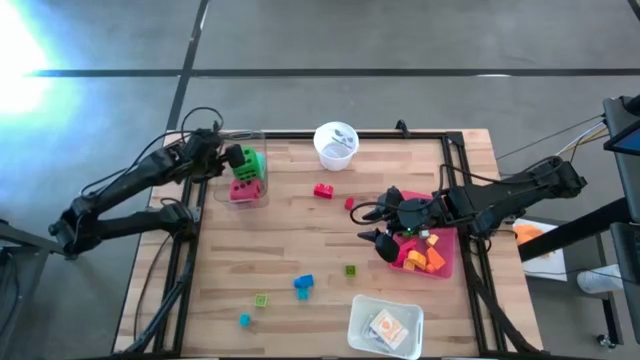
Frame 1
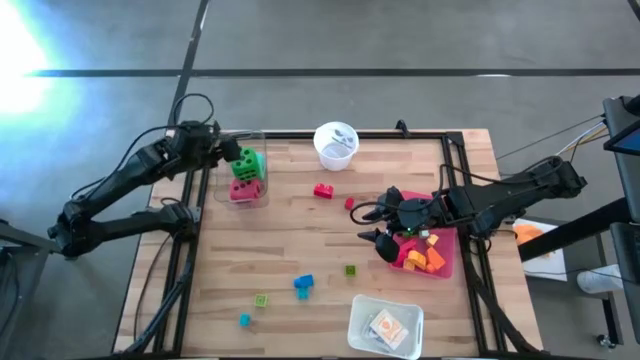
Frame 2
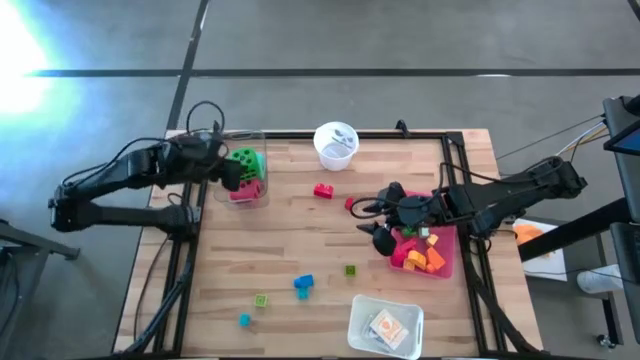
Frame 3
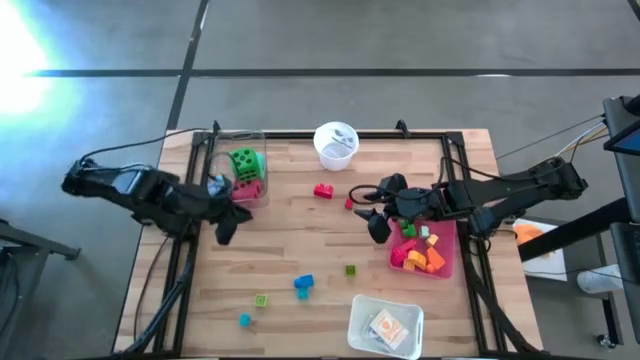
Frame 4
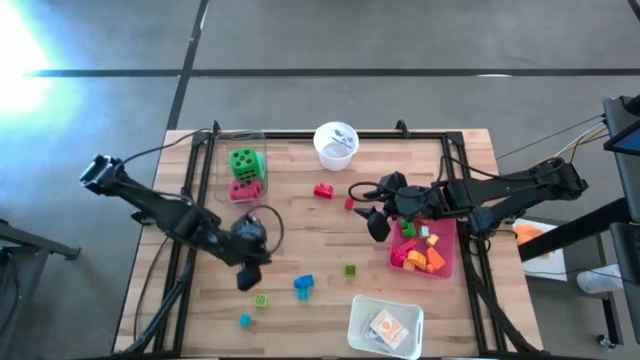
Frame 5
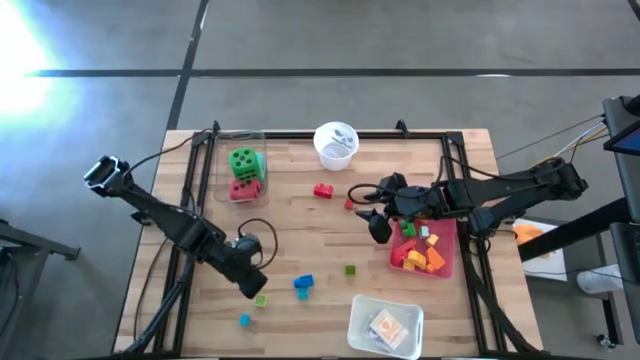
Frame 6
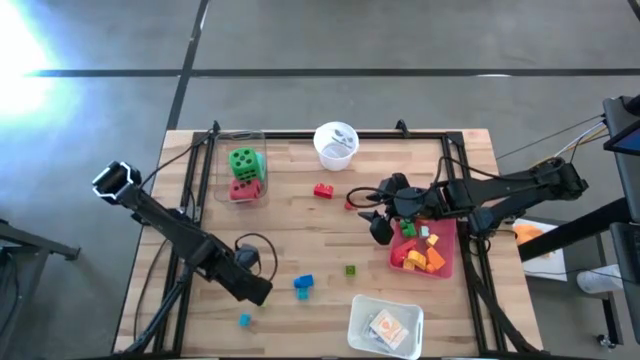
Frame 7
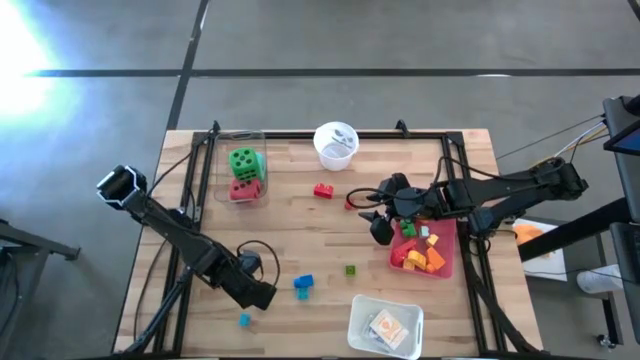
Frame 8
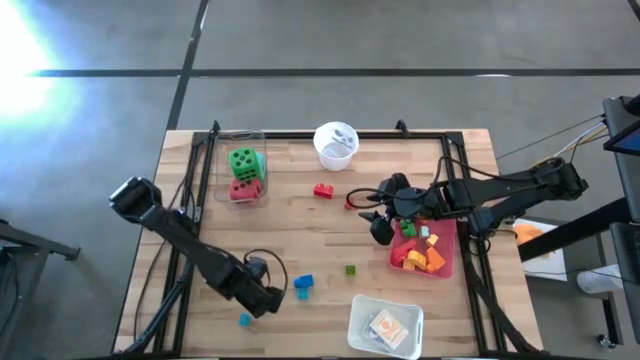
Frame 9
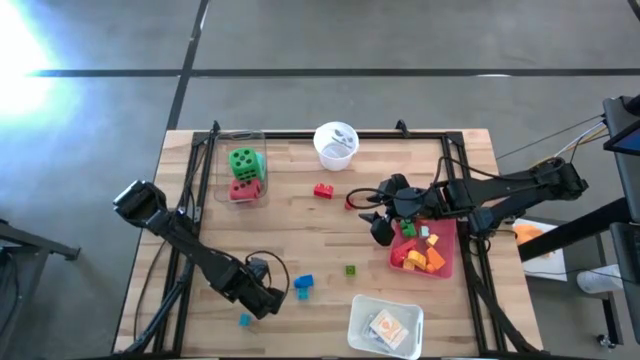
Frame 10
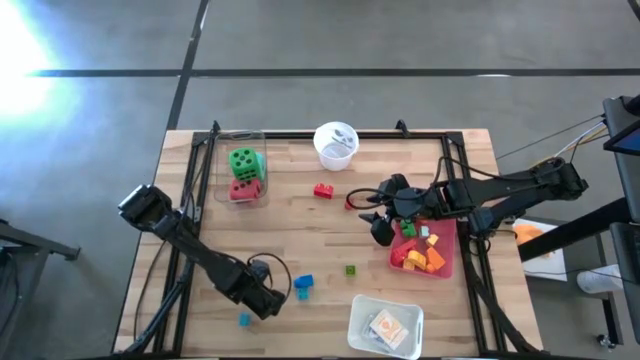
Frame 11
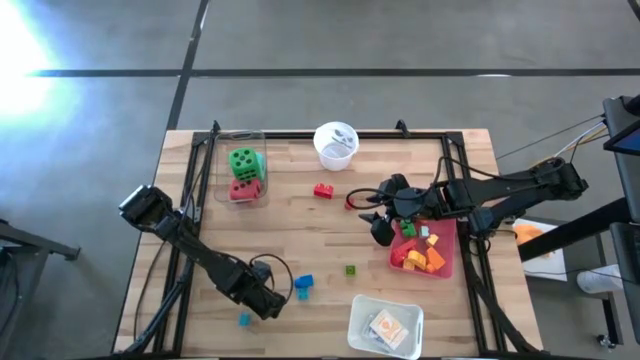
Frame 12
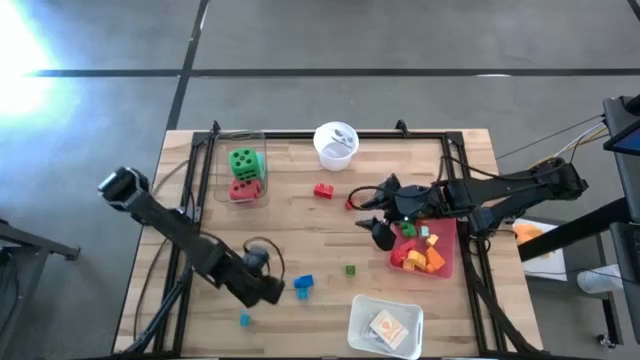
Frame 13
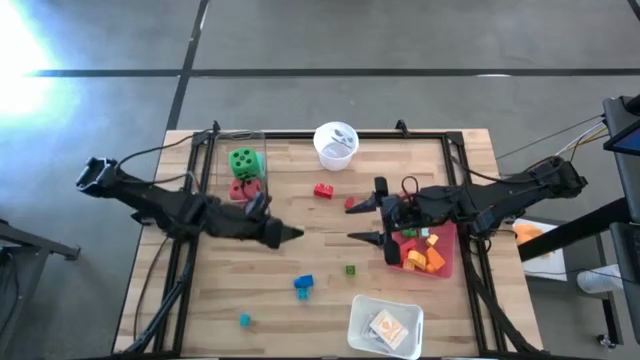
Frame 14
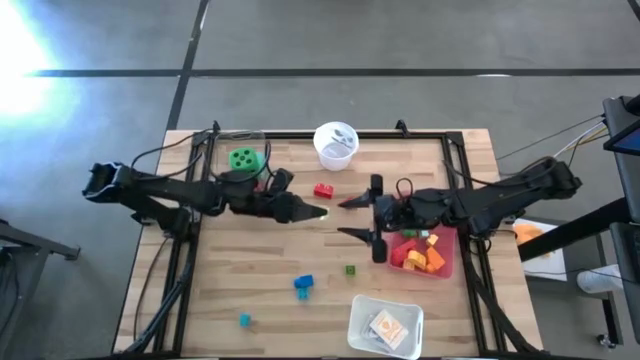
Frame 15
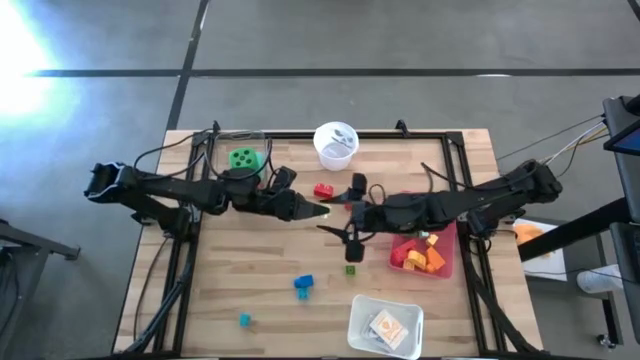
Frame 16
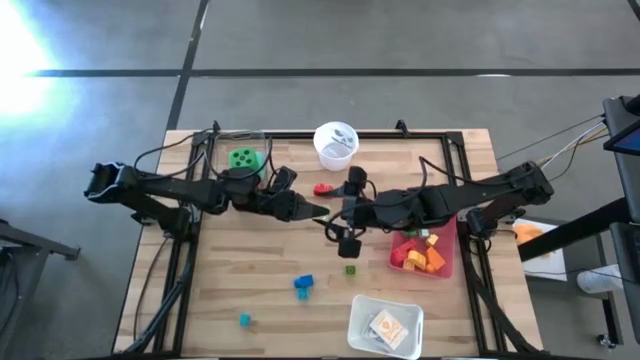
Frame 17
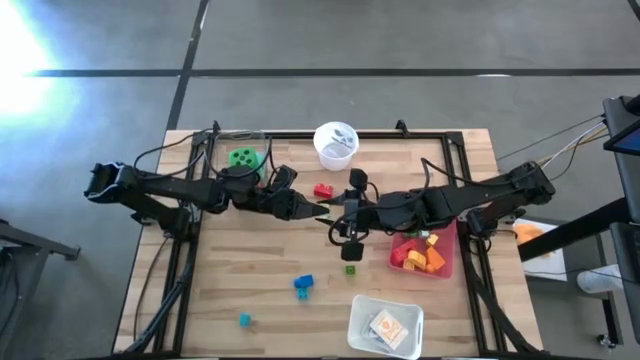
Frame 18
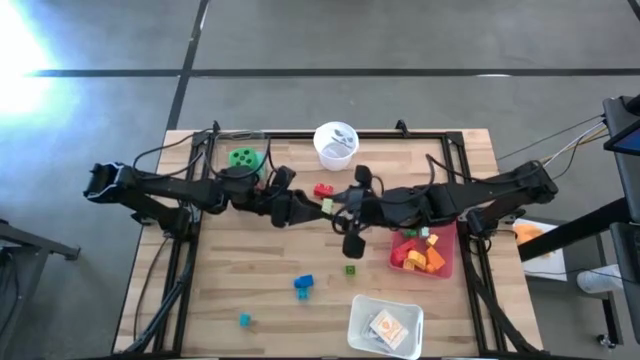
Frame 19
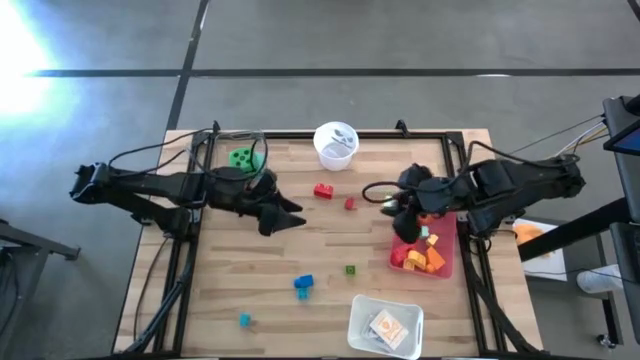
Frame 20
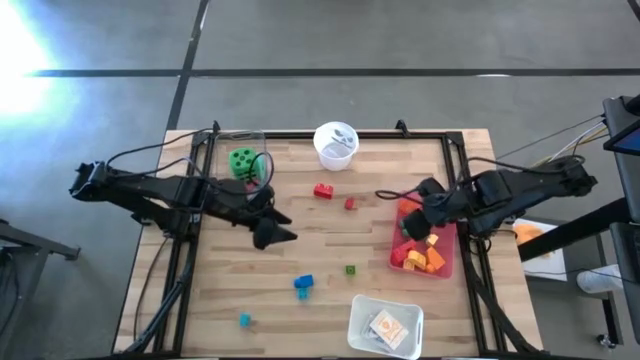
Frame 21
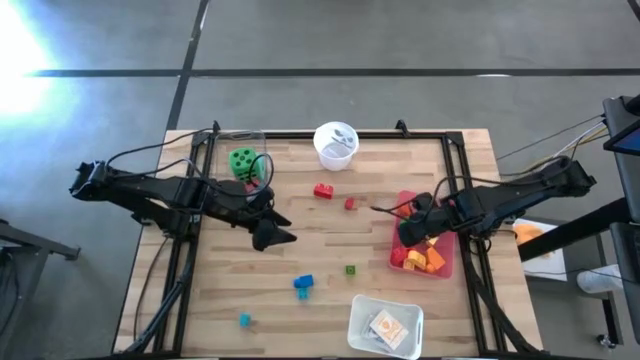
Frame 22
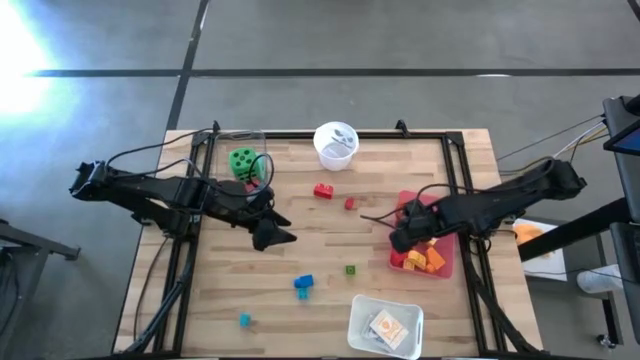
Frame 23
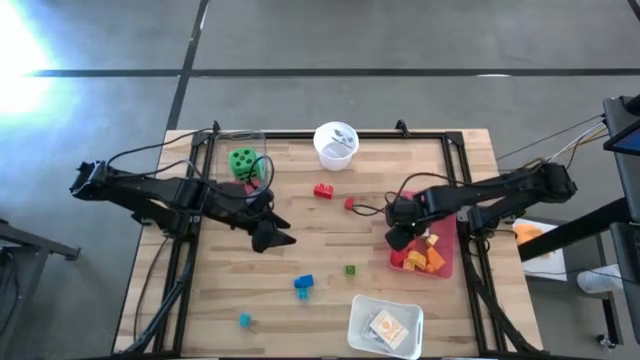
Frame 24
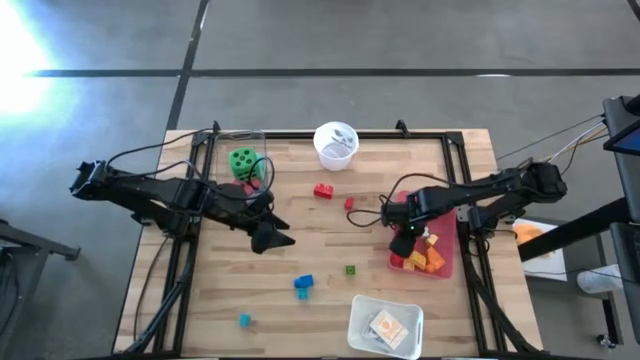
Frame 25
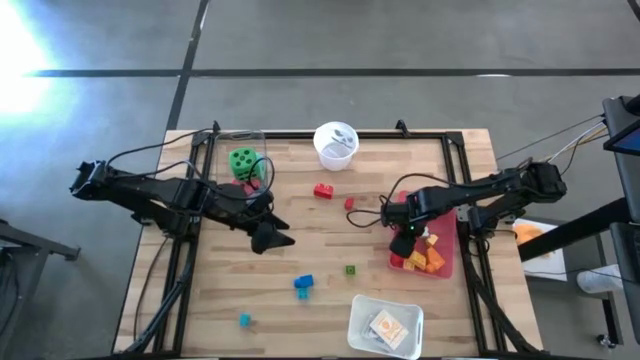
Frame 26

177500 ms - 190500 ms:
Task: Pick & Place Toys
Put the light green game piece into the pink bin

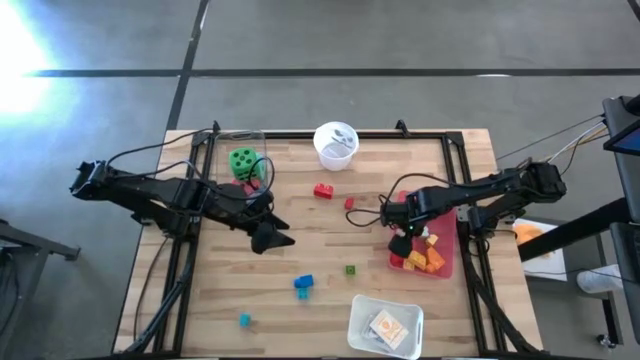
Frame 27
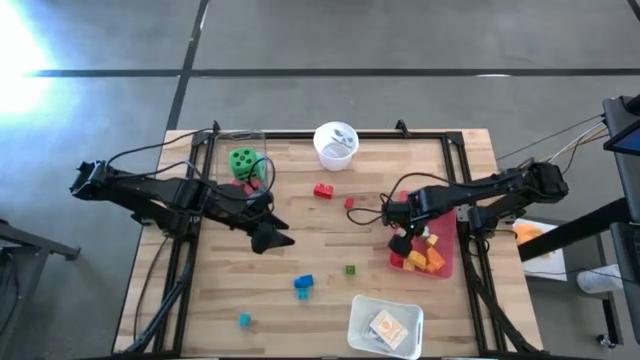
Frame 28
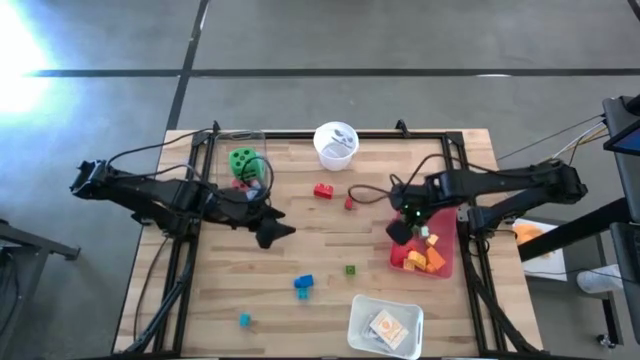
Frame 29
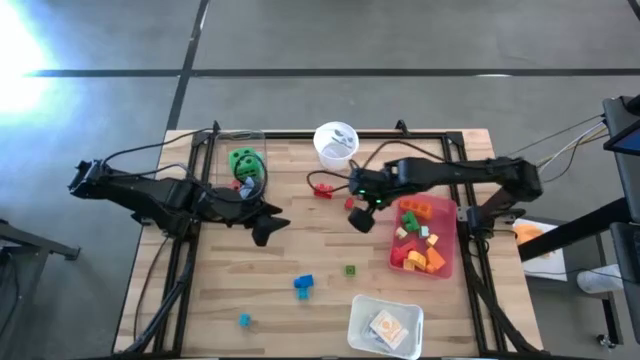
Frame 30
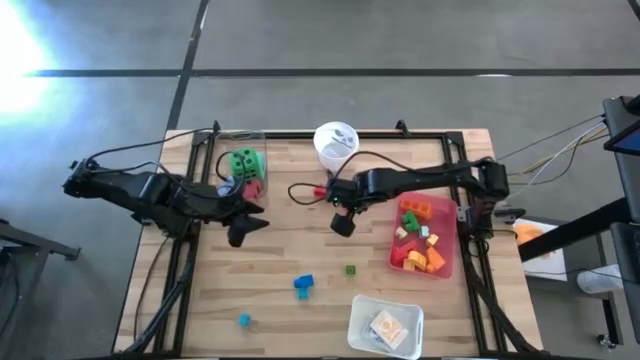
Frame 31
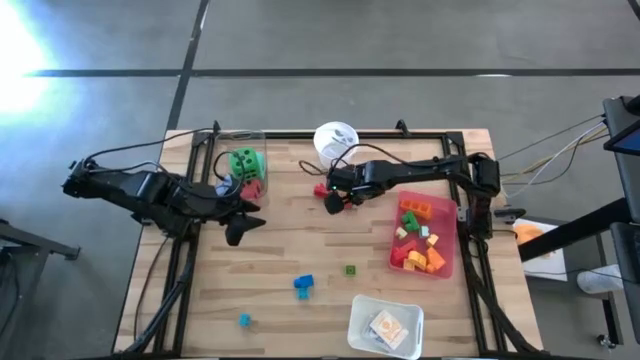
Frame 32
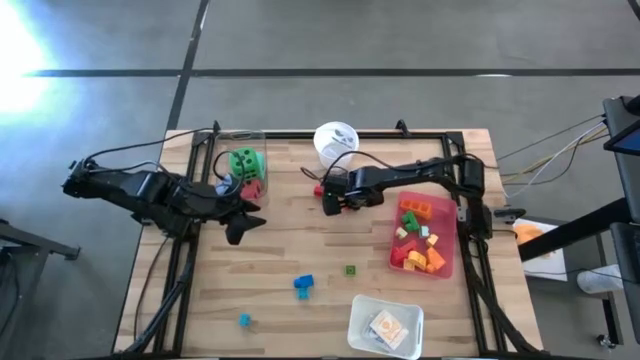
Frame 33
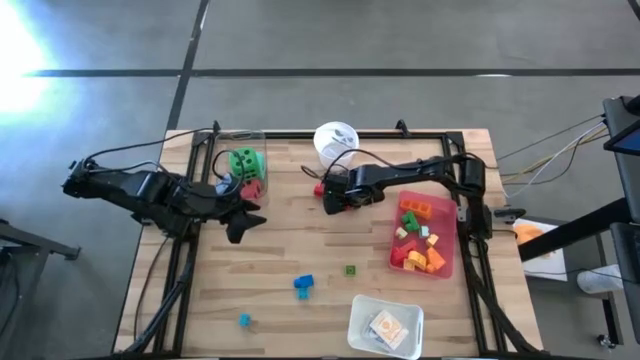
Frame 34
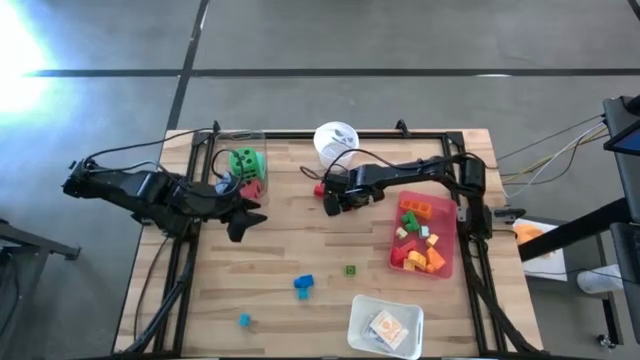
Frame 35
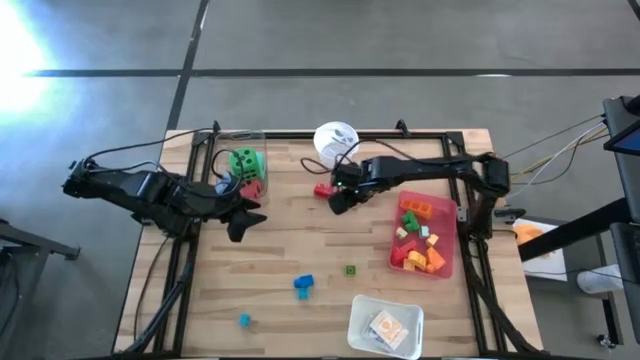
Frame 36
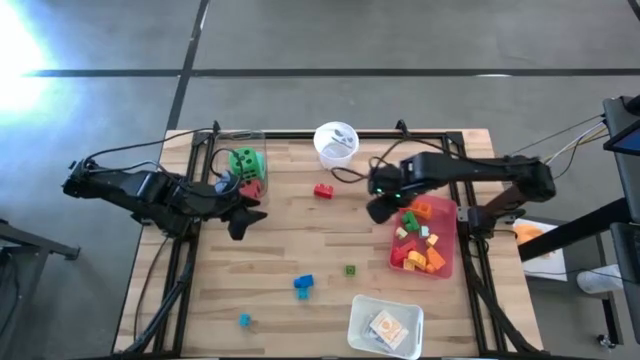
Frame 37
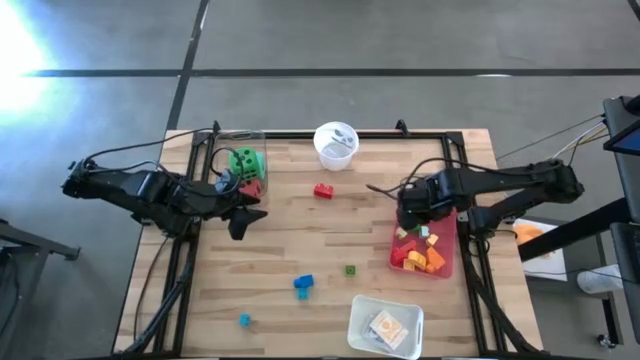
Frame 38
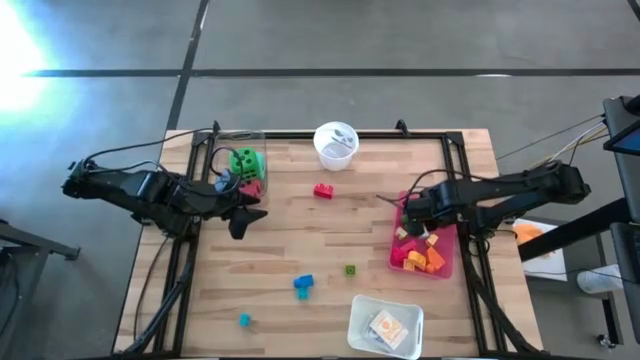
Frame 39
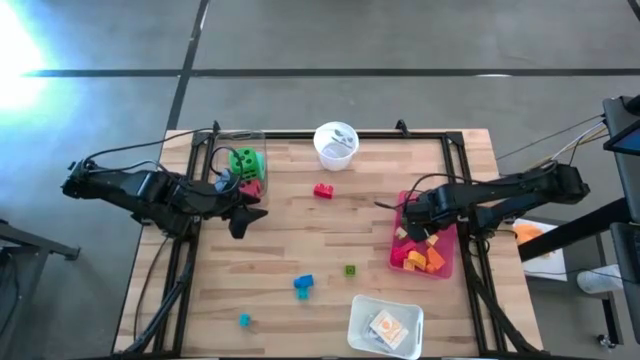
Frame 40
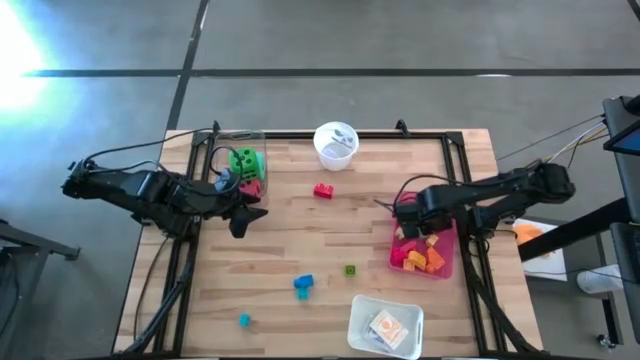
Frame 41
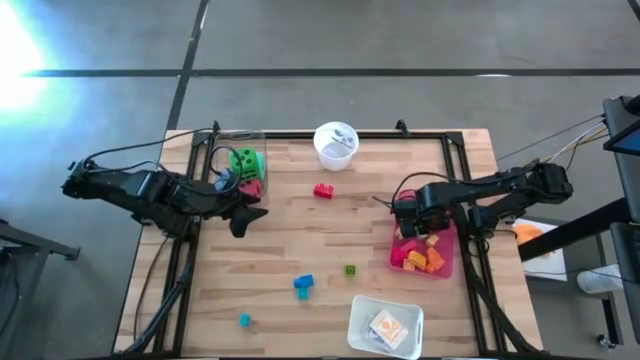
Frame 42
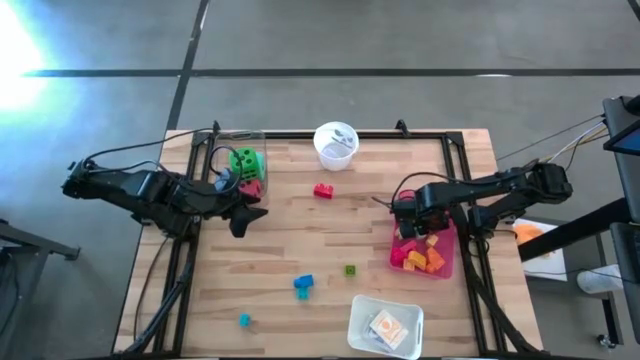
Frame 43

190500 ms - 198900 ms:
Put the right red game piece into the pink bin

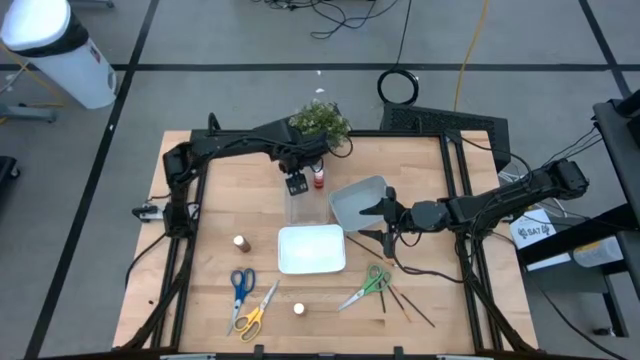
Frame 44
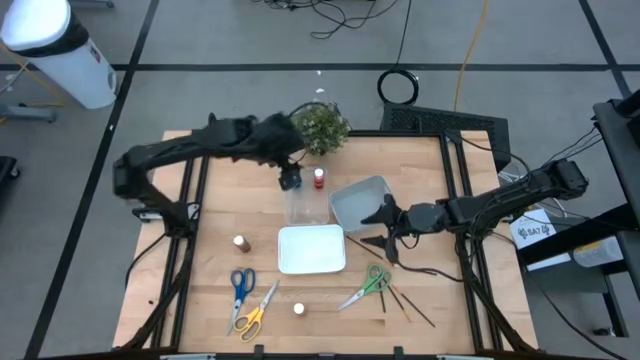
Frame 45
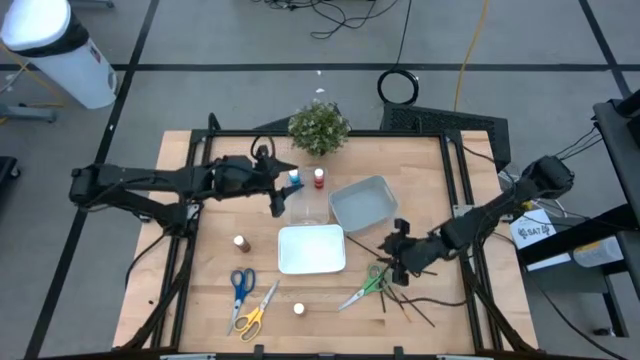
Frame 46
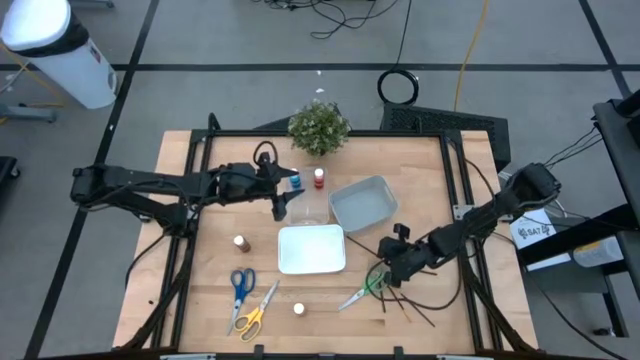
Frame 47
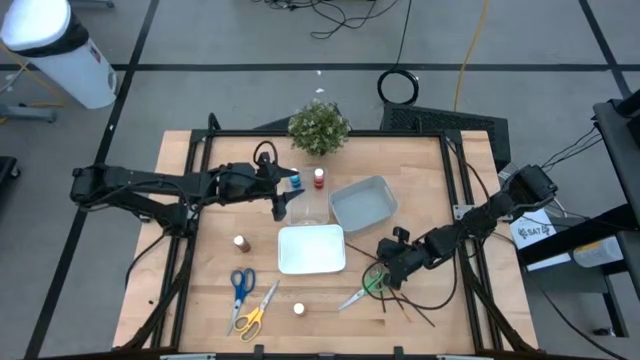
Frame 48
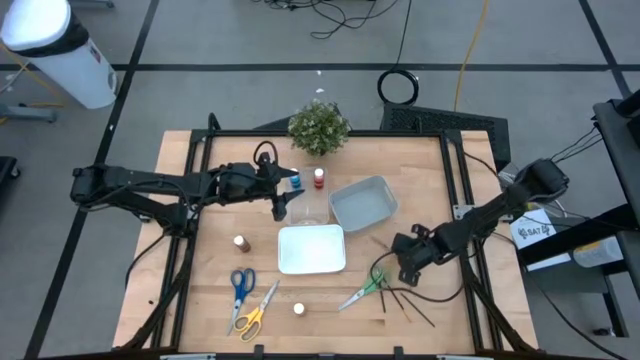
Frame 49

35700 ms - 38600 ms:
Task: Pick & Place Paint Supplies
Put the gold paintbrush into the gray bin
